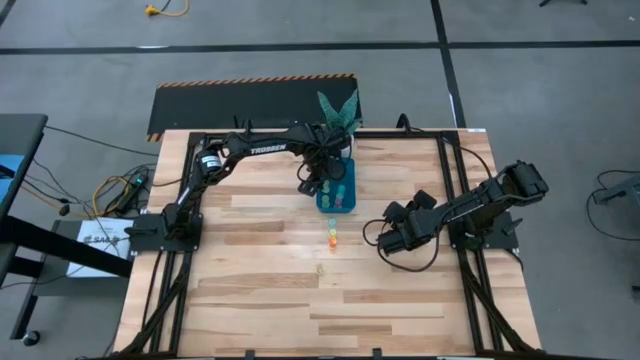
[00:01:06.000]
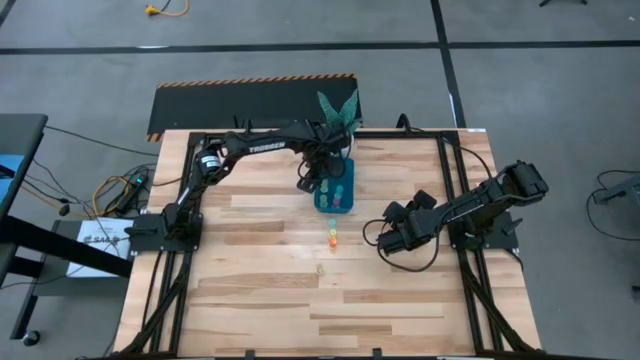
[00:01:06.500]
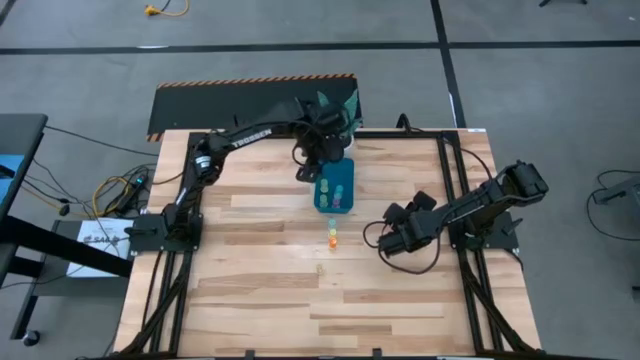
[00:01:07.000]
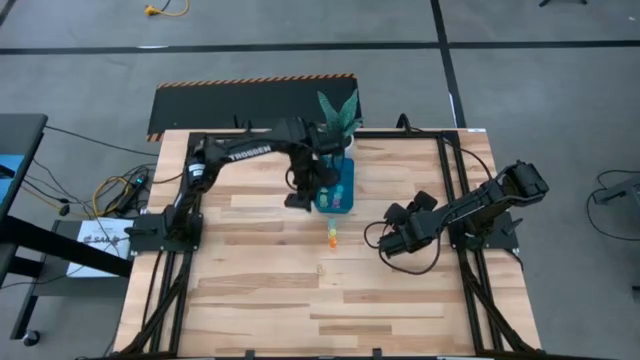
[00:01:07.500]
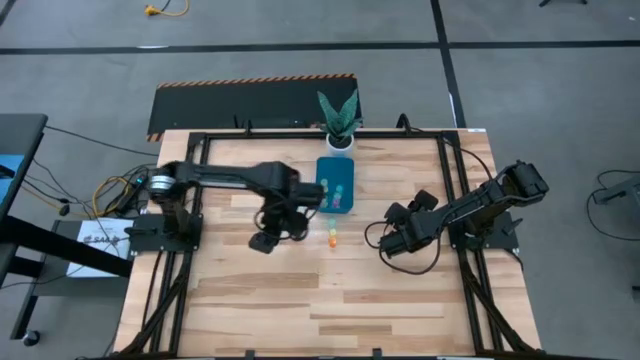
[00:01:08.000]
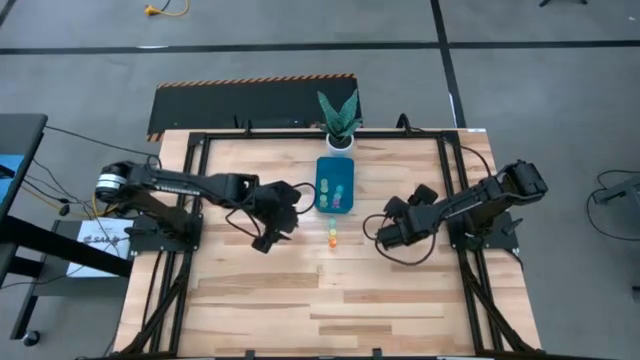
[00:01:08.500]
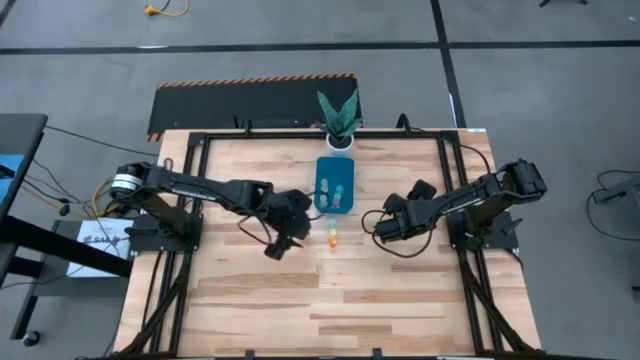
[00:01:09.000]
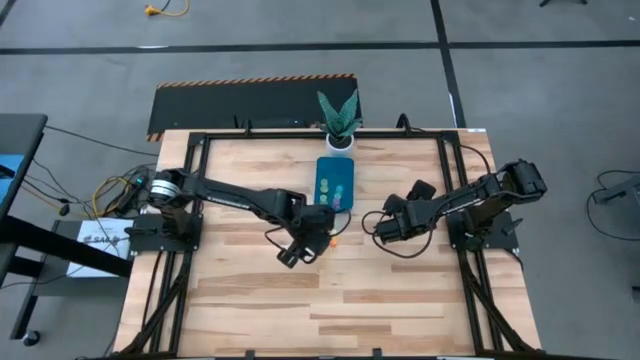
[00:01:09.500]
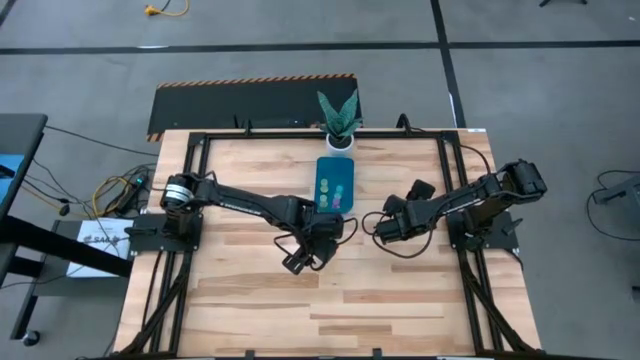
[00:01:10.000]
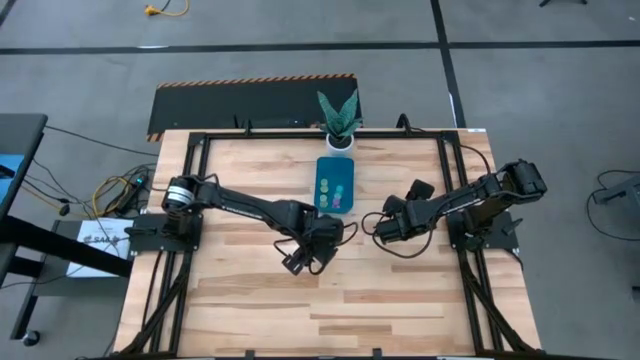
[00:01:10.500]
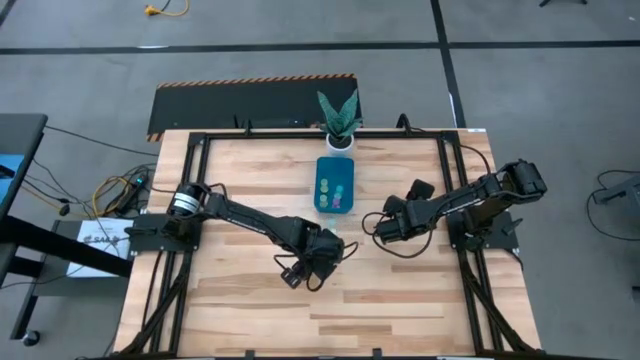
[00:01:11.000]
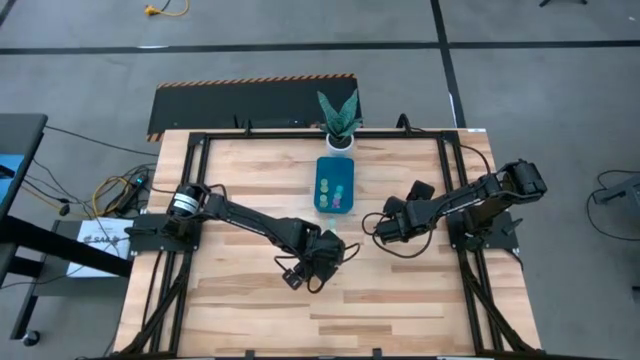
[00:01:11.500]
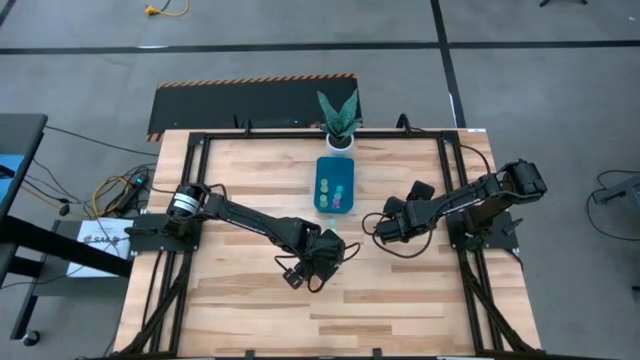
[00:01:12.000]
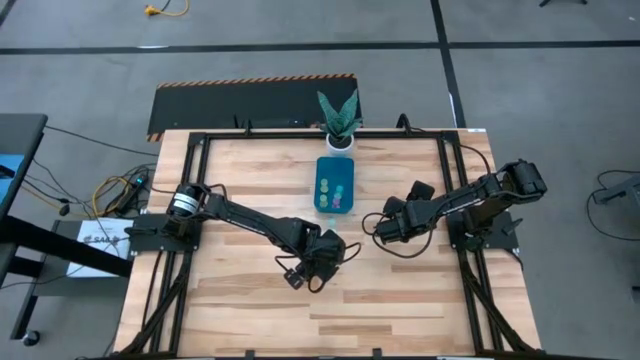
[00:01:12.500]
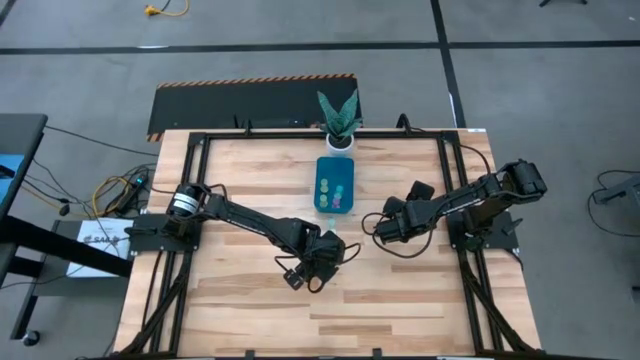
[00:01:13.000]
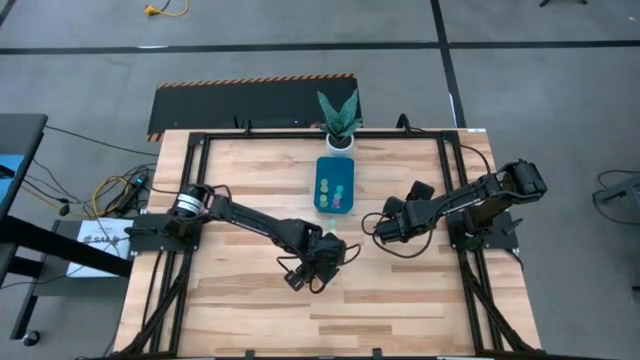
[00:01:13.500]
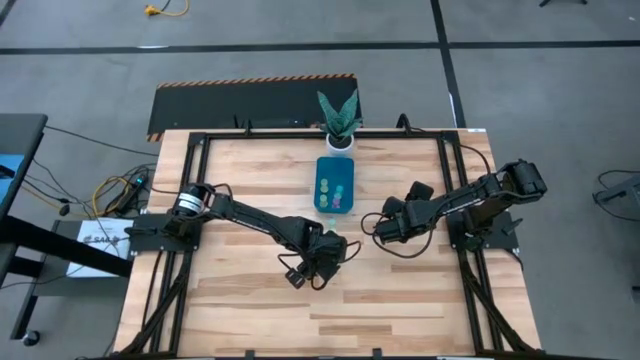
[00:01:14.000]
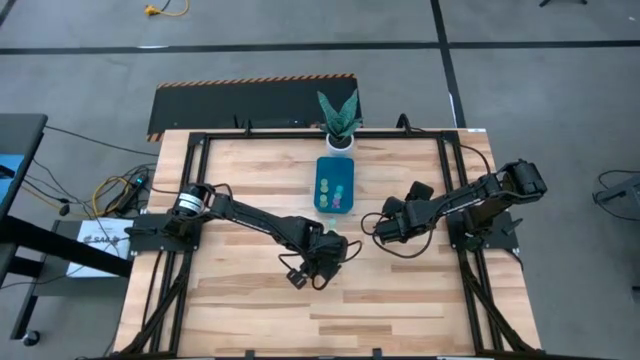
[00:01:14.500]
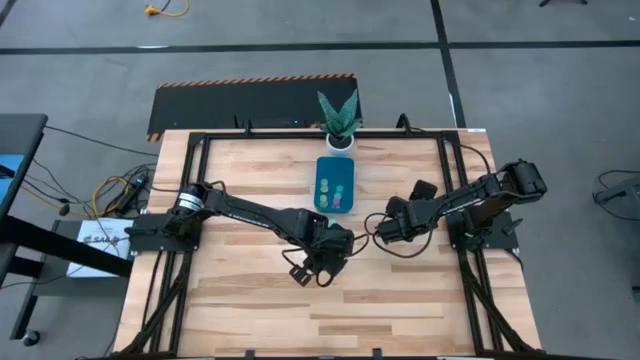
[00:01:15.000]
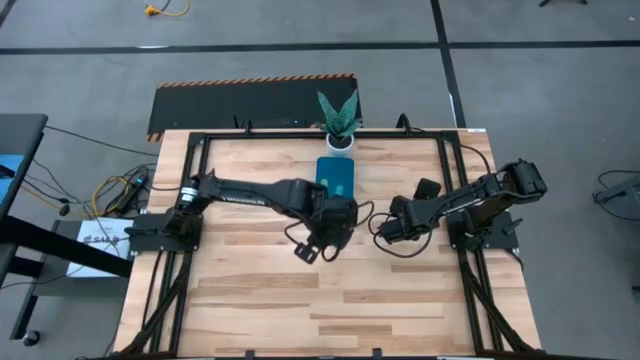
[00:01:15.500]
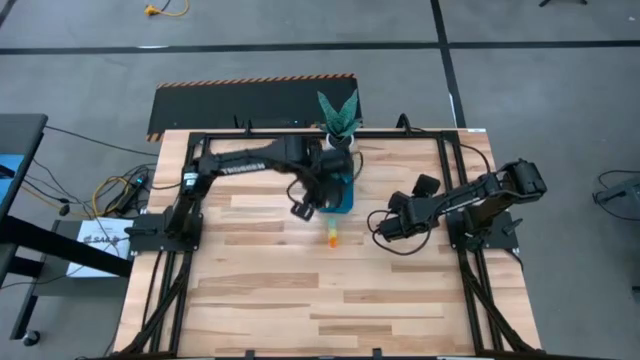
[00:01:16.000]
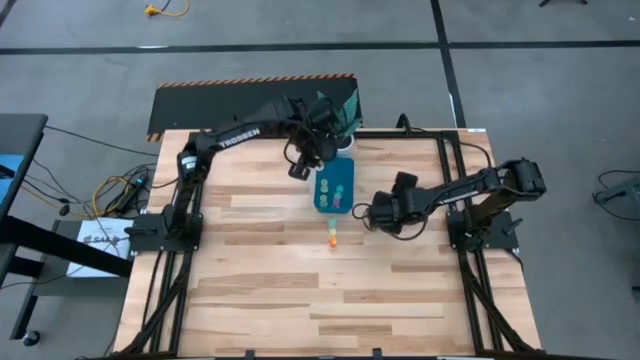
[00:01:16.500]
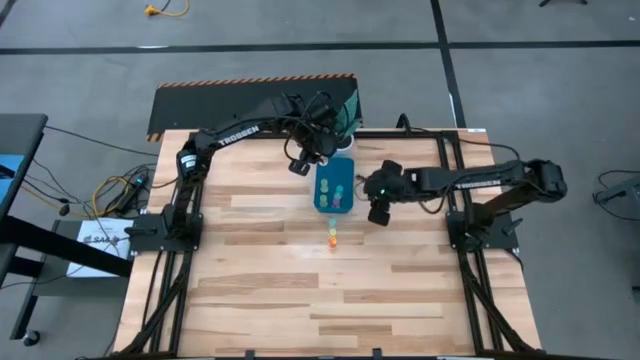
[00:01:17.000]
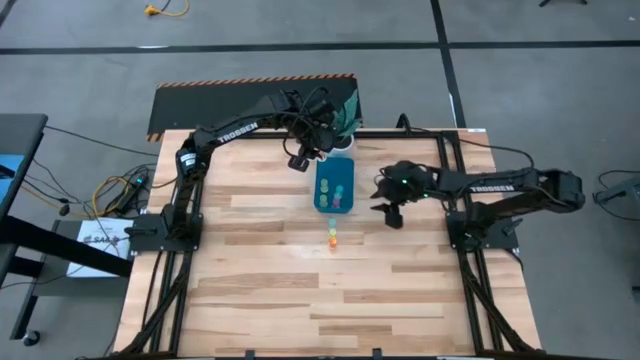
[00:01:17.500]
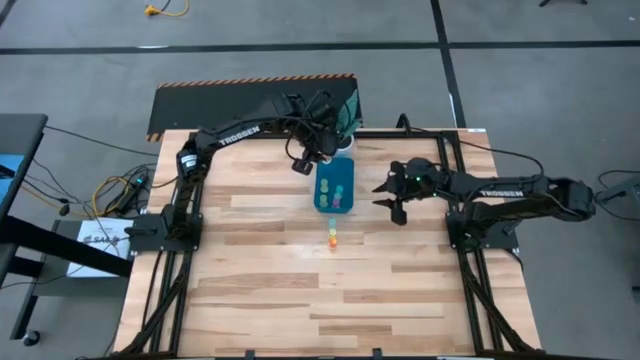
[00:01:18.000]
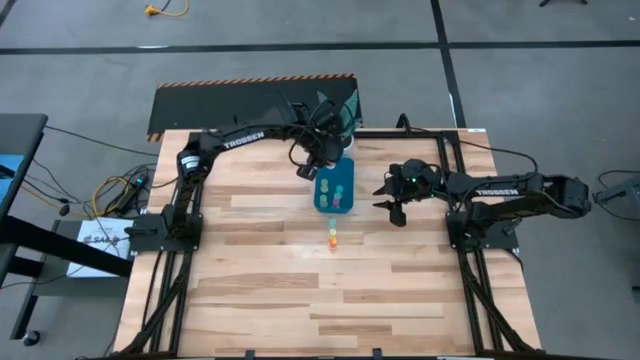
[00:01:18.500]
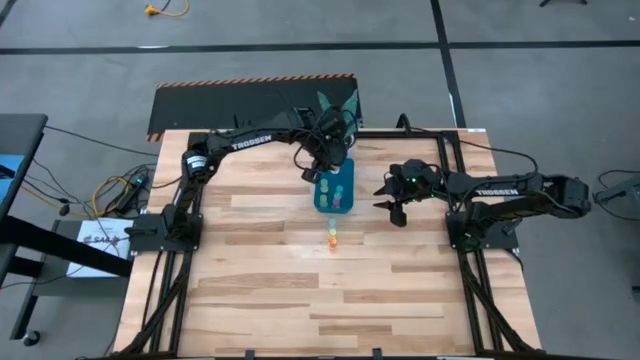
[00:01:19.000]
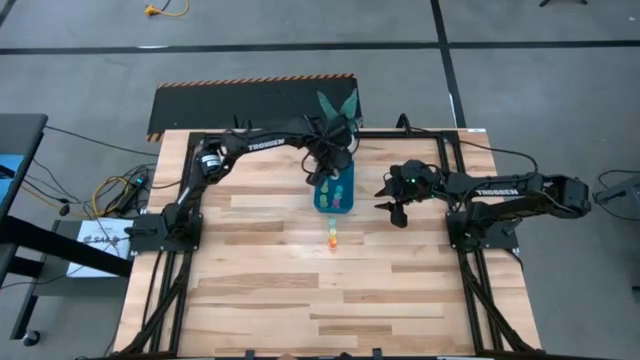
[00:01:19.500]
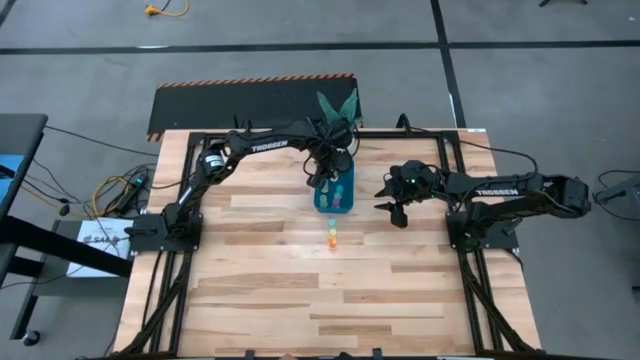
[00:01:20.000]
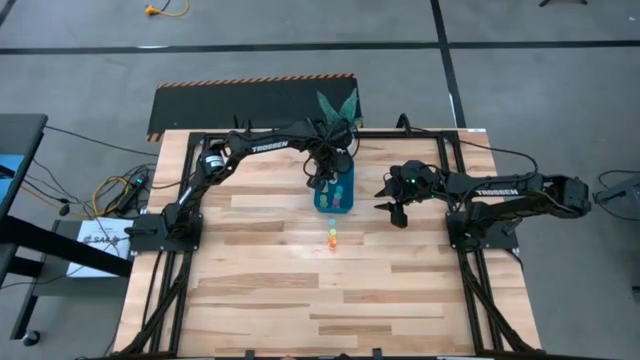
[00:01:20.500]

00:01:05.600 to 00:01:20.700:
Task: Pick and place pill bottles into a basket
Put the yellow pill bottle into the blue bin

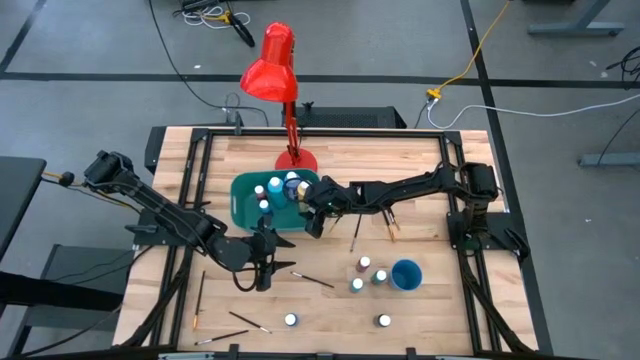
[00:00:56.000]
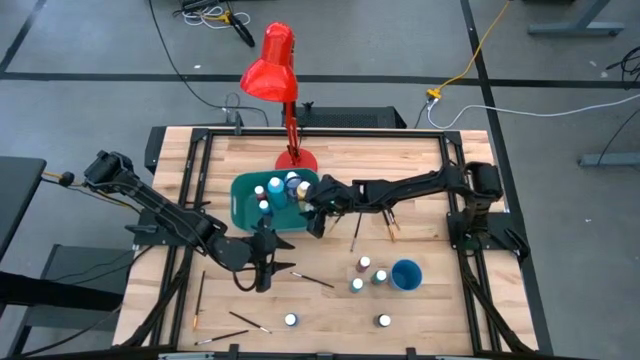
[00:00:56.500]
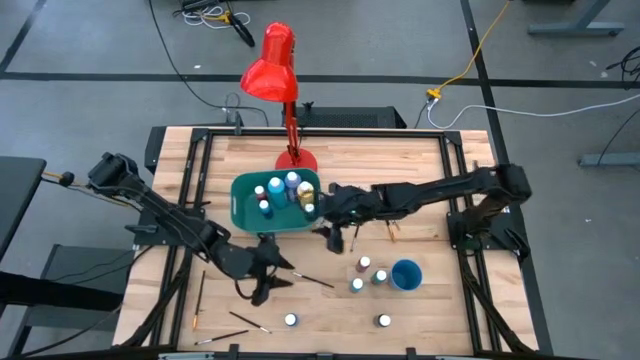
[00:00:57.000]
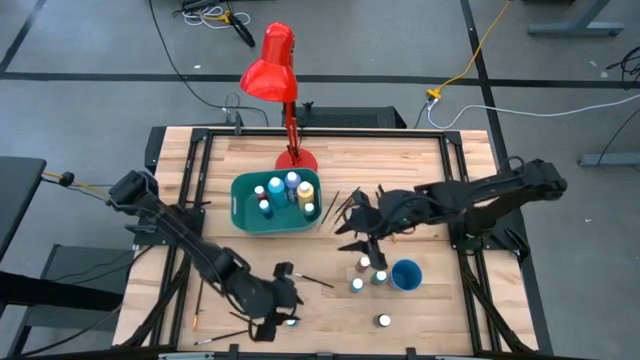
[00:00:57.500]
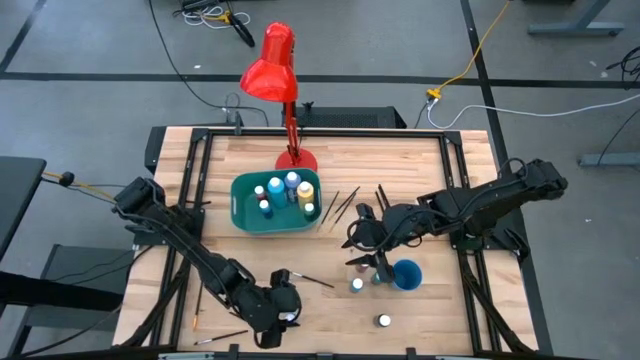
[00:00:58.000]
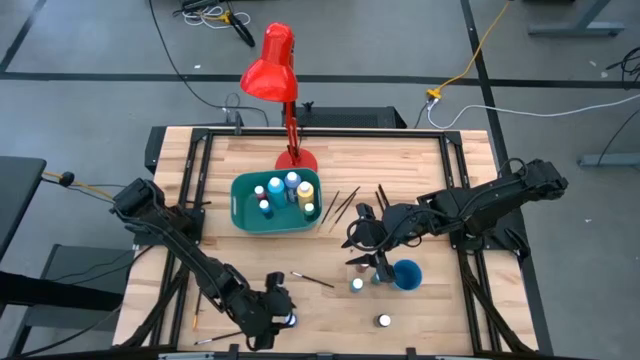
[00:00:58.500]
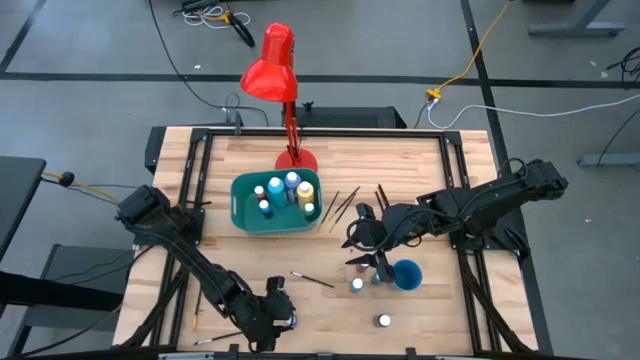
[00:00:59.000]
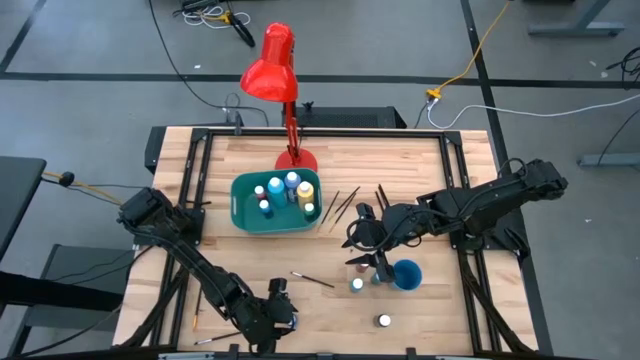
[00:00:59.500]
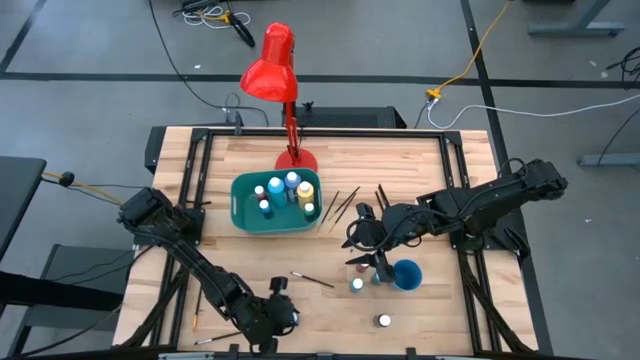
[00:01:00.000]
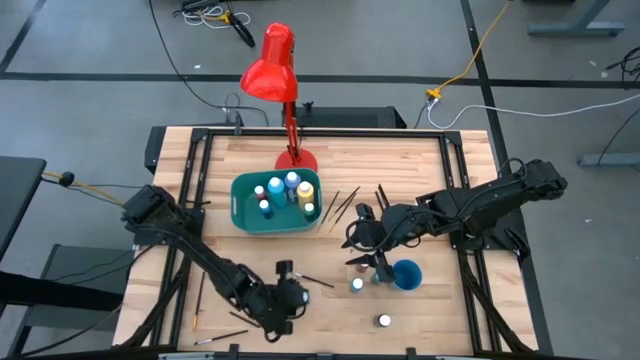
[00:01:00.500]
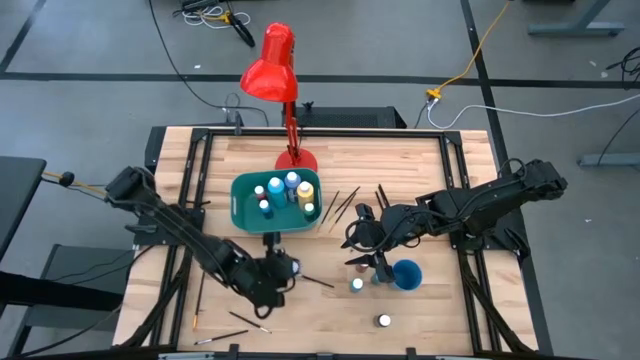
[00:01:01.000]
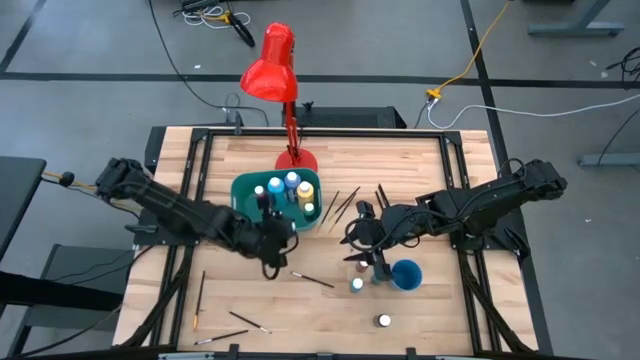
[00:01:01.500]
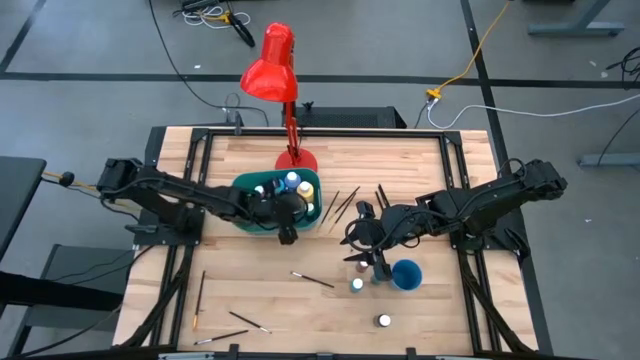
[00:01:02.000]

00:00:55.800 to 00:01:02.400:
Task: Pick & Place Paint Supplies
Put the small dark blue paint bottle into the green bin
